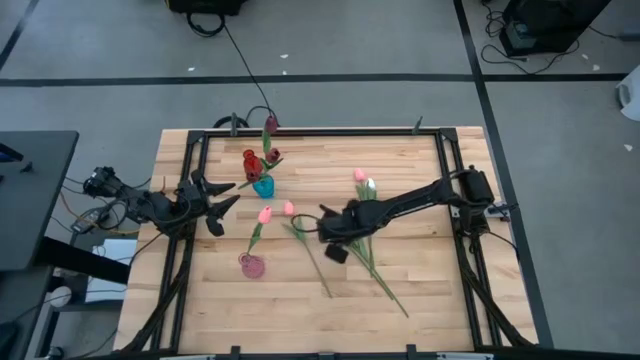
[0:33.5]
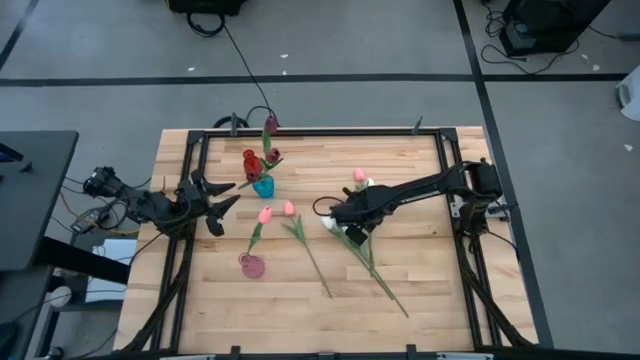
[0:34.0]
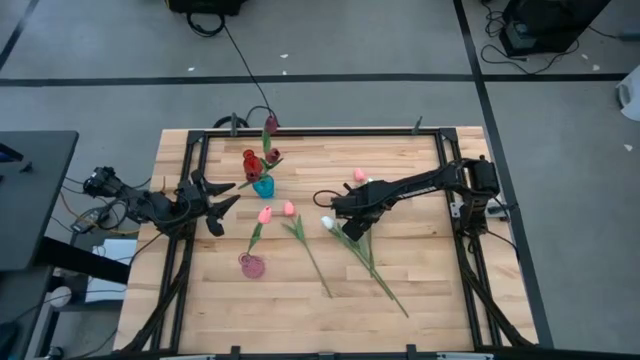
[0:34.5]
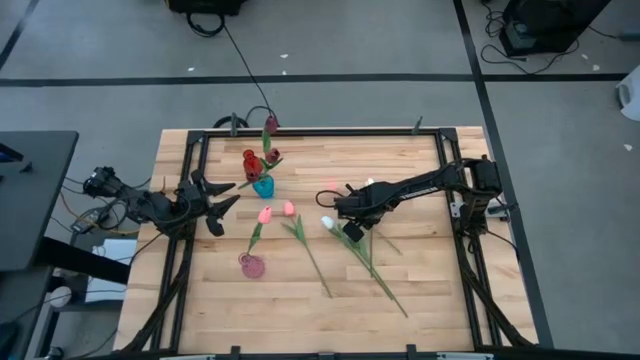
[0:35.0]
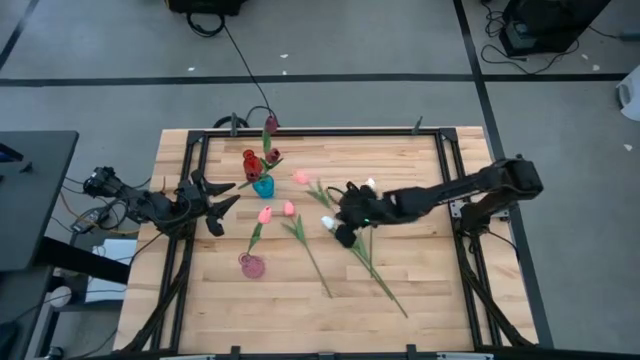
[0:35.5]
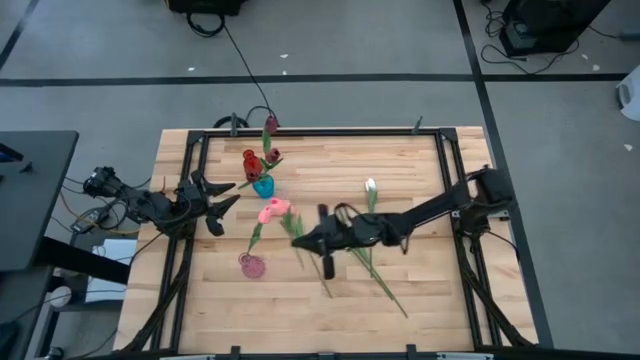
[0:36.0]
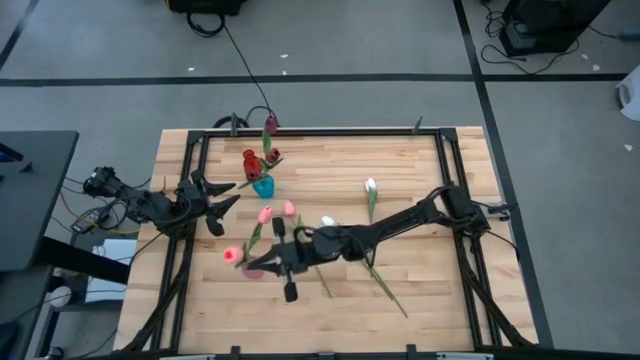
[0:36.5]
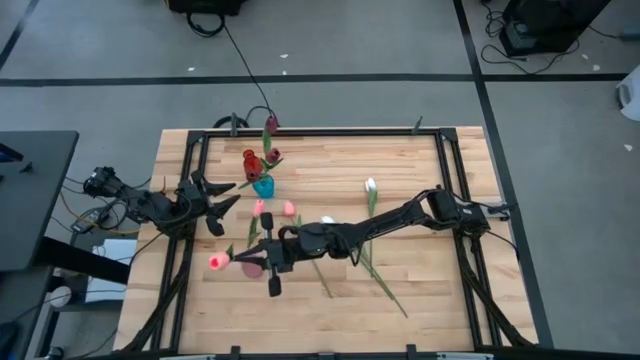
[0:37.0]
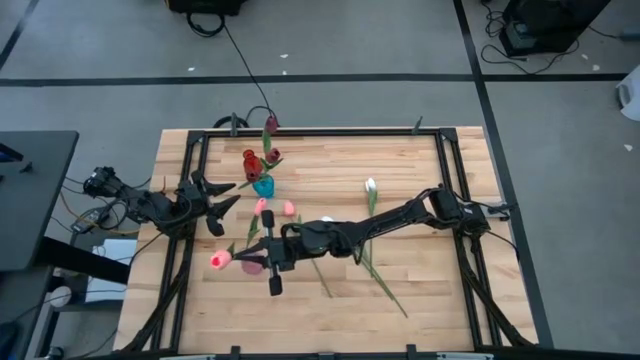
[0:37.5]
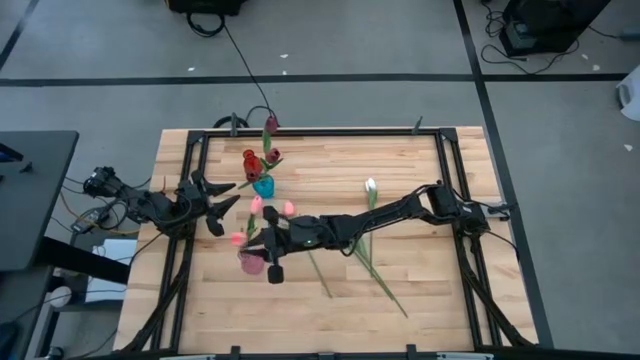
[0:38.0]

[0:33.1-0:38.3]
Task: Sort flowers into vase by color
Put the right pink flower into the purple vase

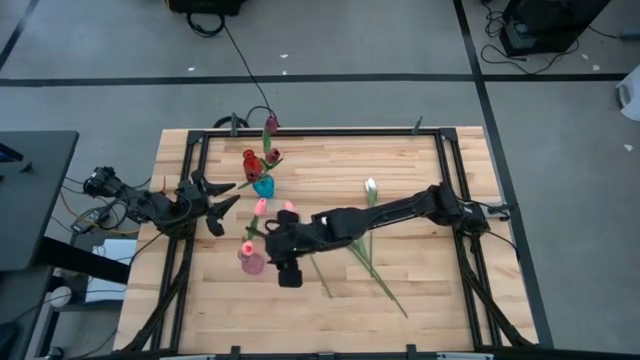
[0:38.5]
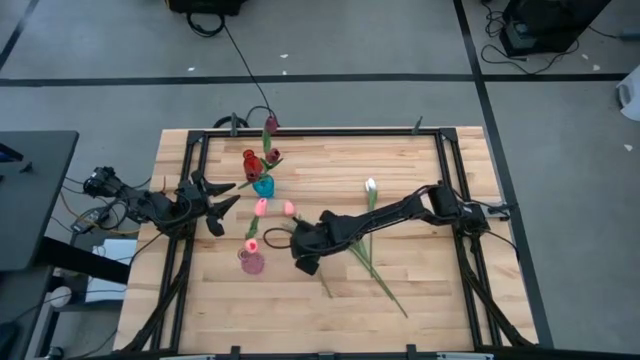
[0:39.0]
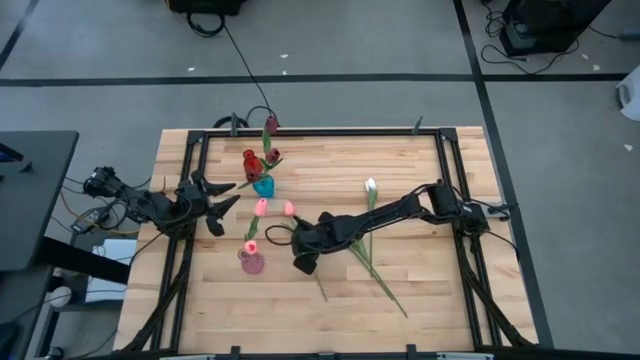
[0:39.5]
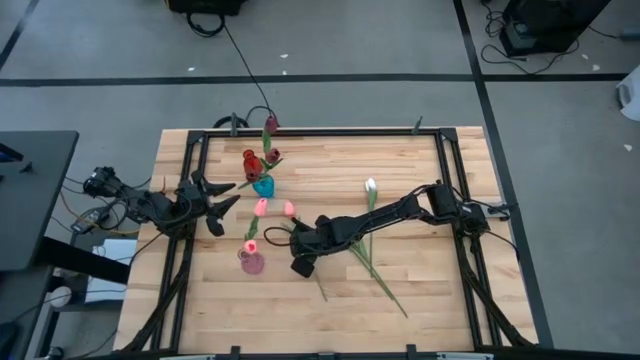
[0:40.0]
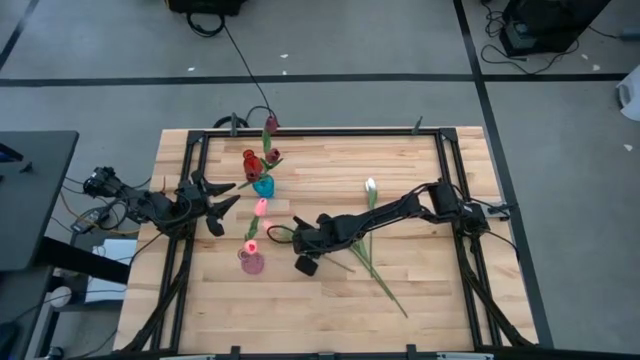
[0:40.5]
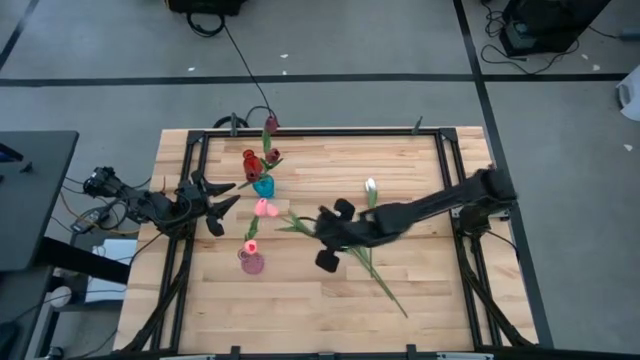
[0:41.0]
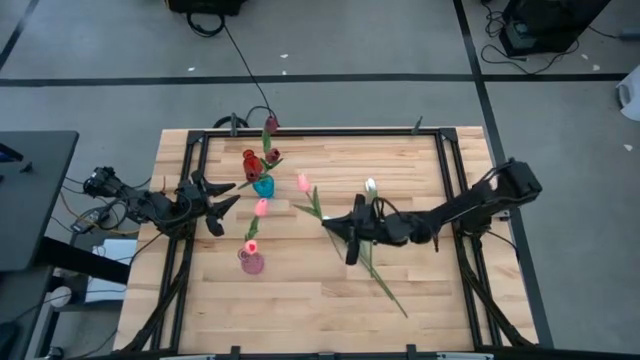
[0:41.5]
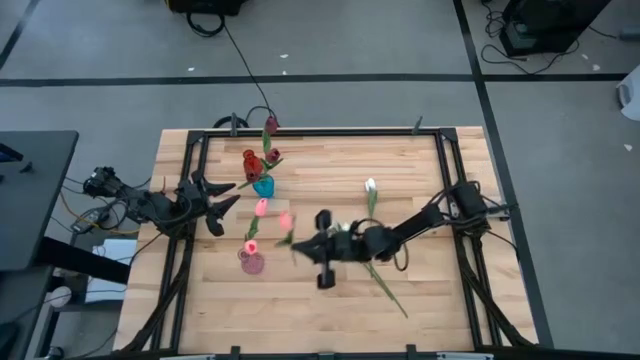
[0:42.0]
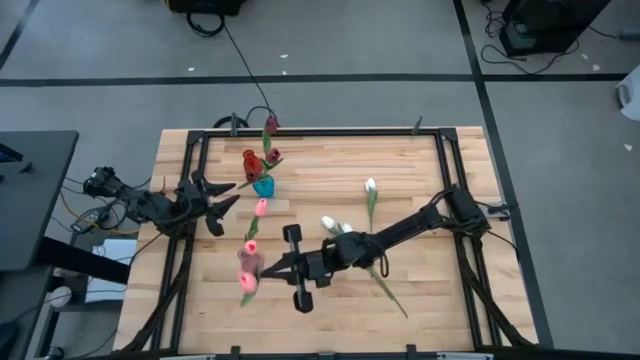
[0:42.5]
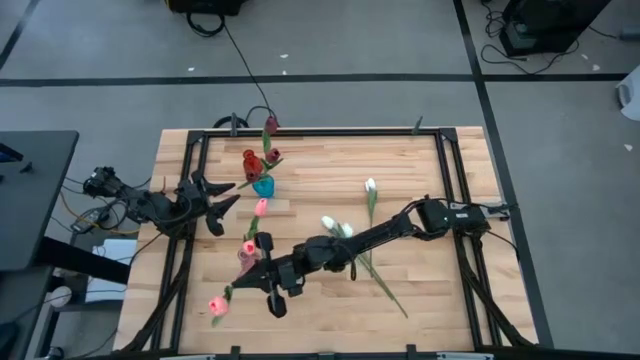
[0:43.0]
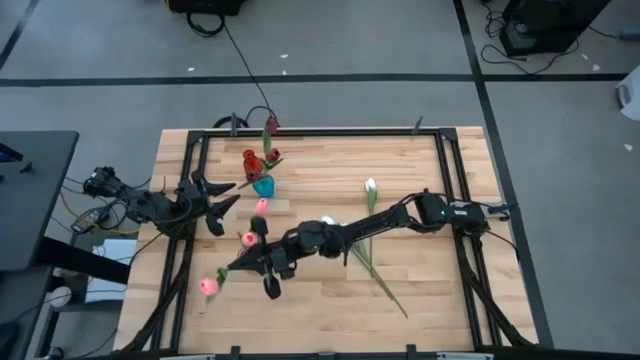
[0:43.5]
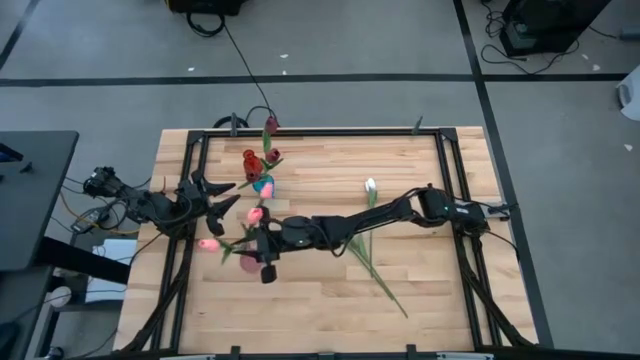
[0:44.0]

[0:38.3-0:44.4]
Put the pink flower into the purple vase

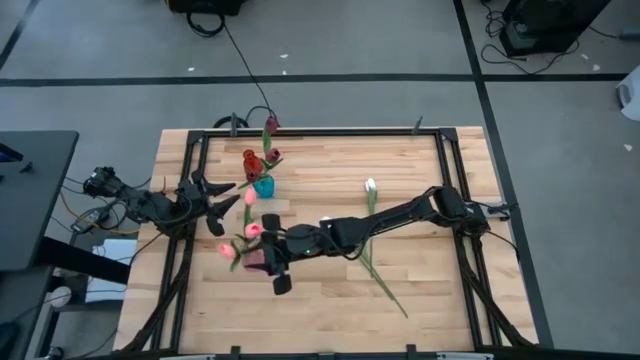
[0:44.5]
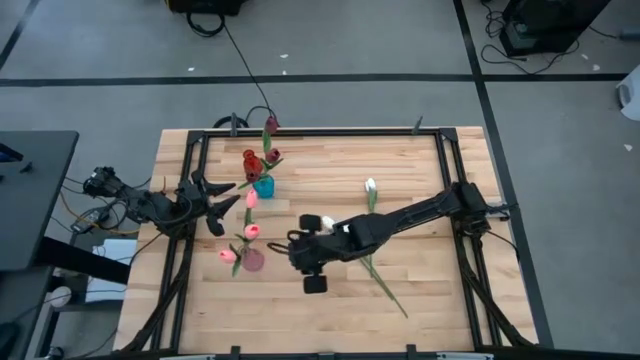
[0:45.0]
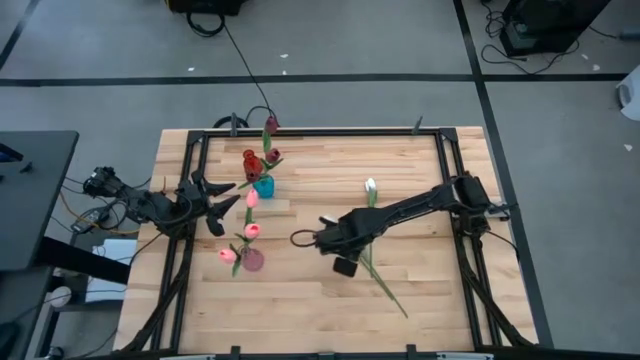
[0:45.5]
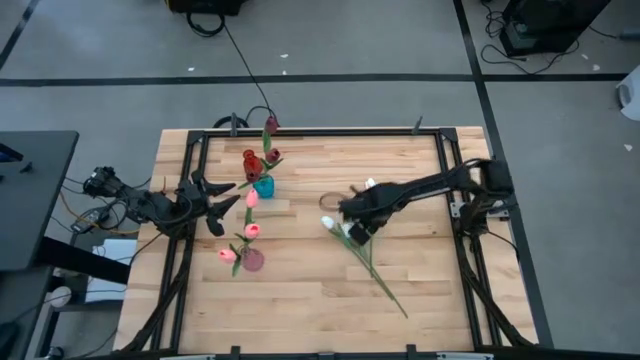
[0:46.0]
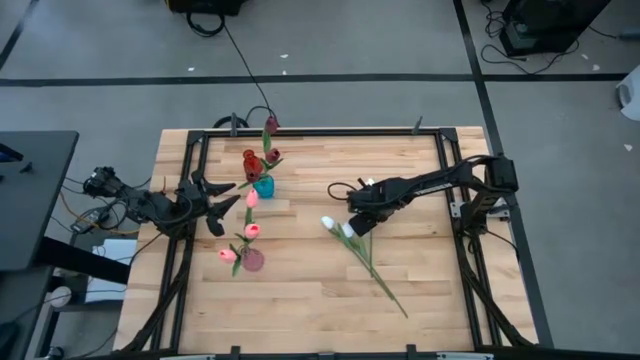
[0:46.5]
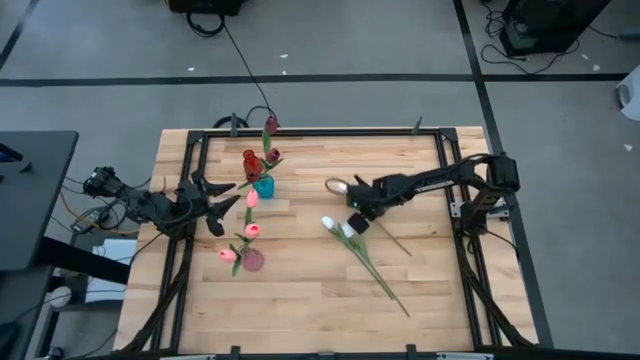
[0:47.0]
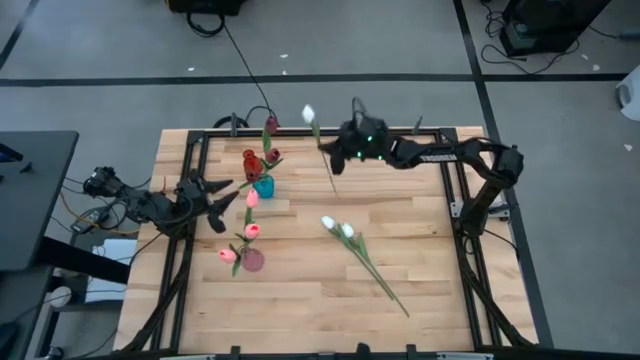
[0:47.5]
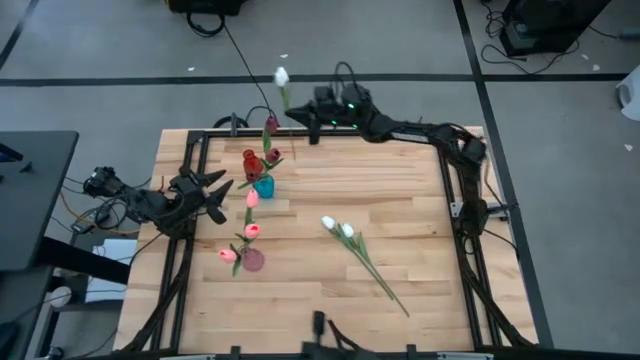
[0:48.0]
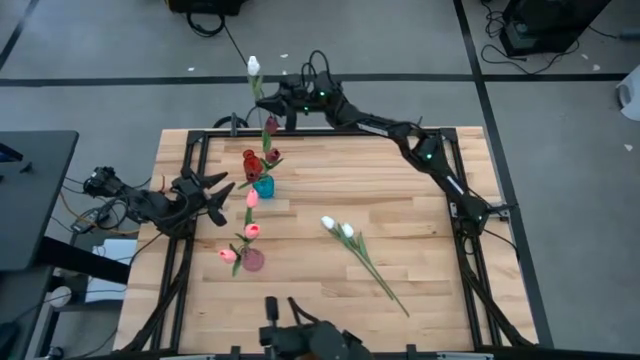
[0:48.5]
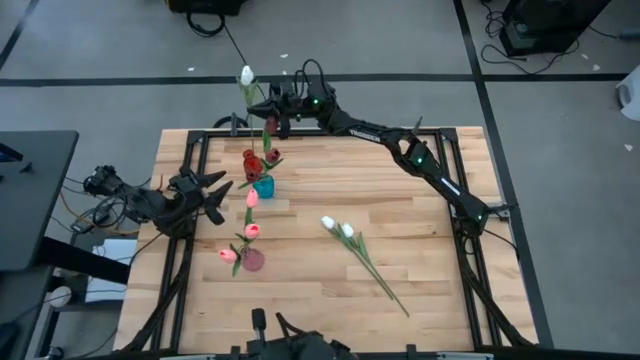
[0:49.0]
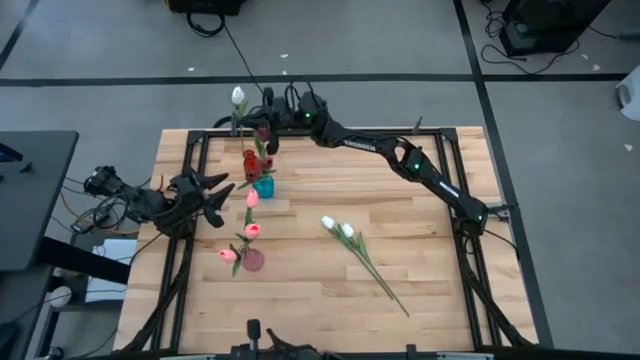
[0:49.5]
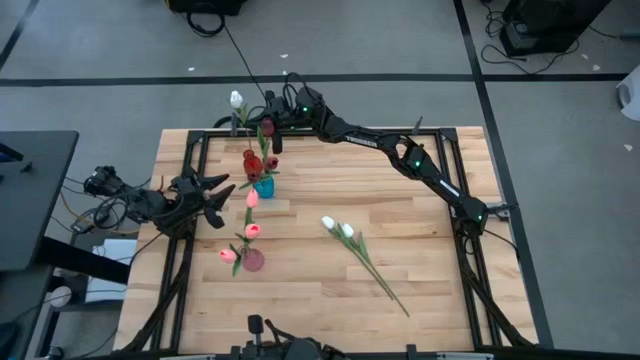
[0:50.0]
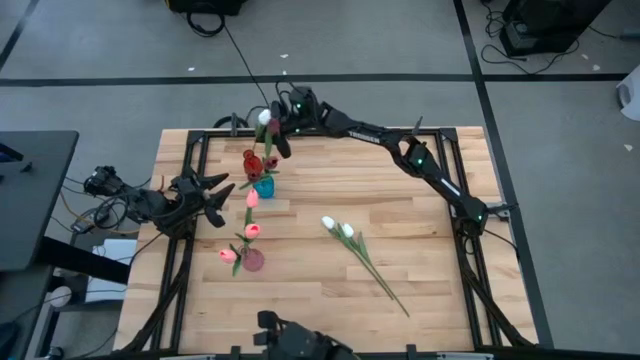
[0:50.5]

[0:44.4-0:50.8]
Put the right white flower into the red vase

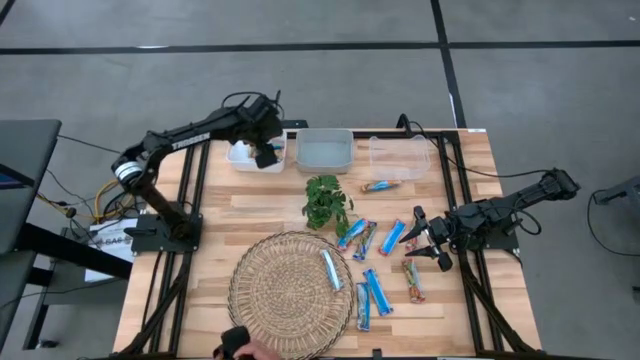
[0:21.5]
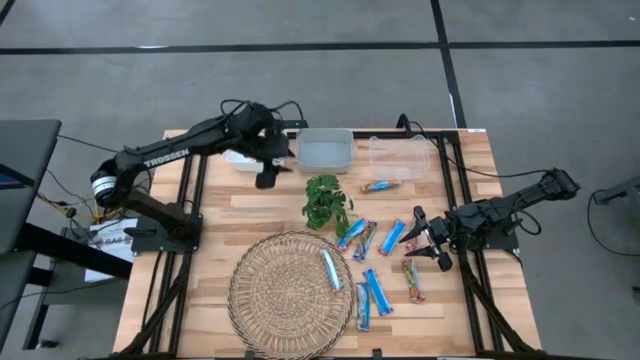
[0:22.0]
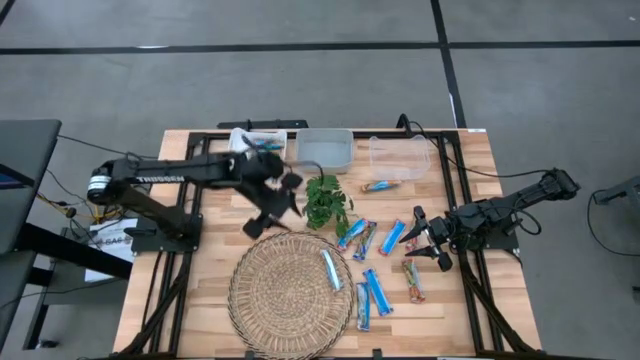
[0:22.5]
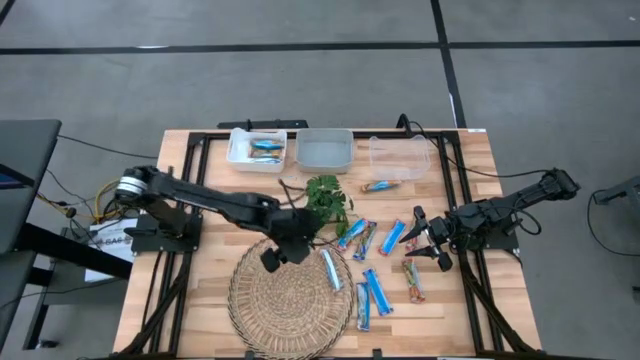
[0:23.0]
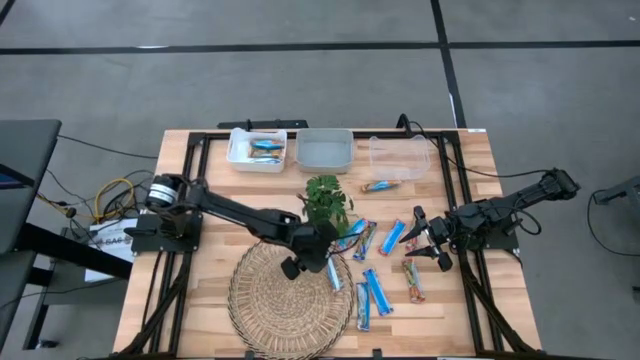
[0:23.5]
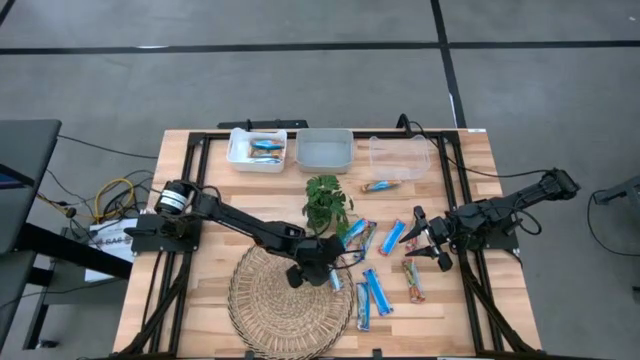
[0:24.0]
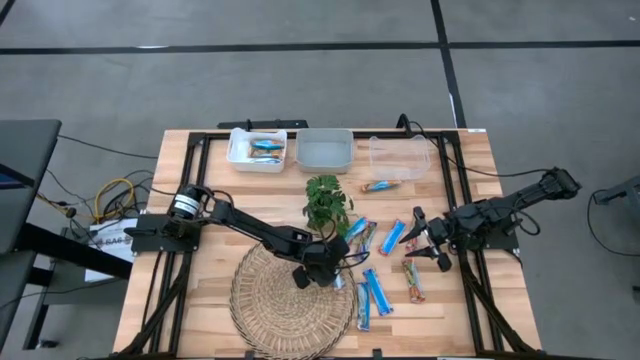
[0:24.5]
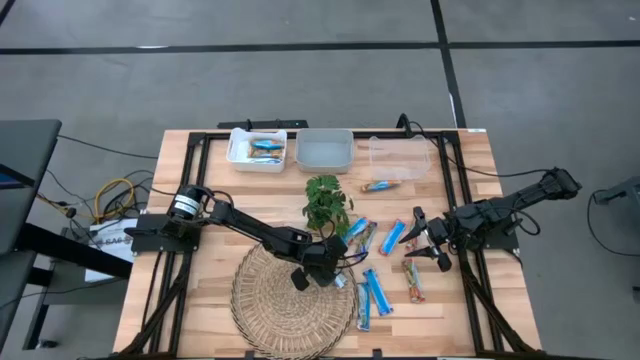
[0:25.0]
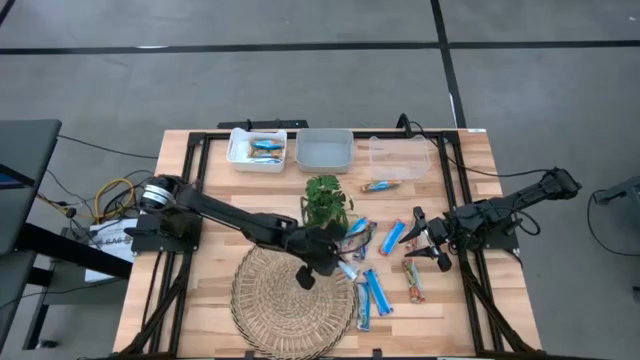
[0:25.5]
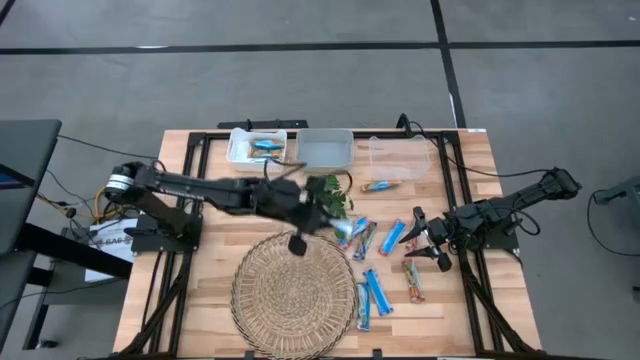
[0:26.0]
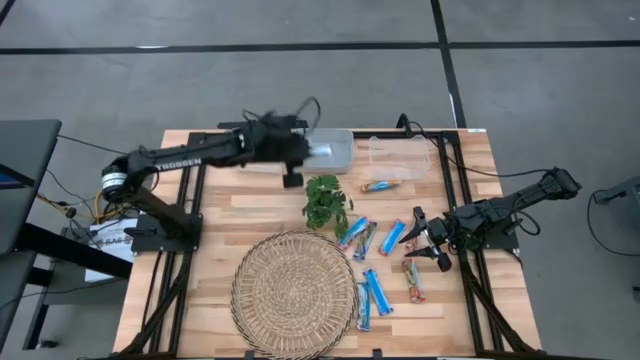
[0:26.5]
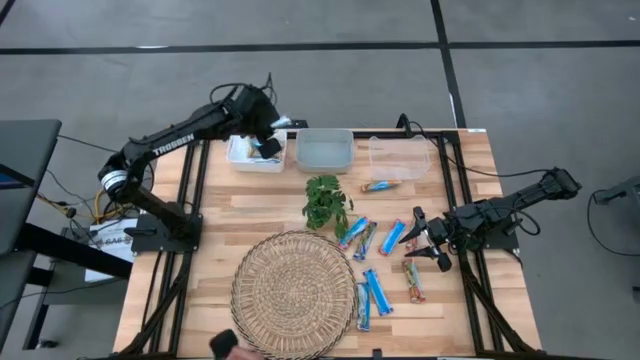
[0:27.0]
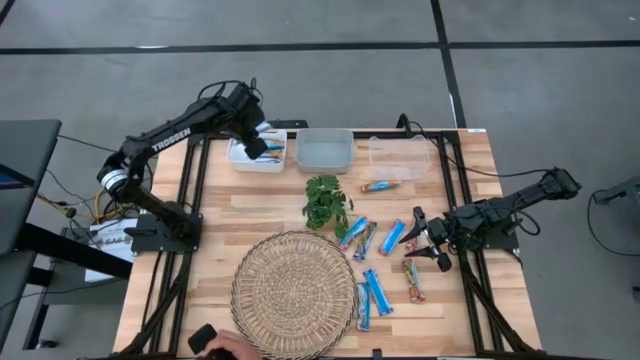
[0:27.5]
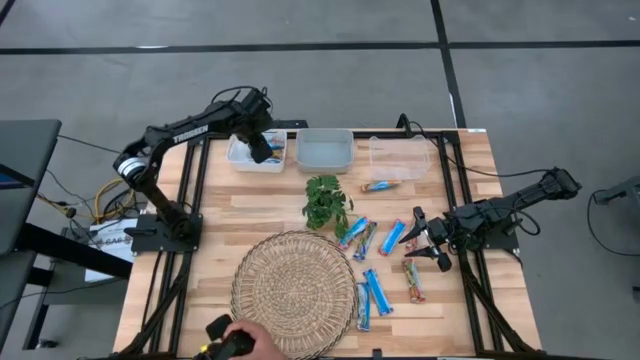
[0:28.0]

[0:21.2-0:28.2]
Task: Pick and place Granola Bars by type
Put the yellow granola bar into the white bin
